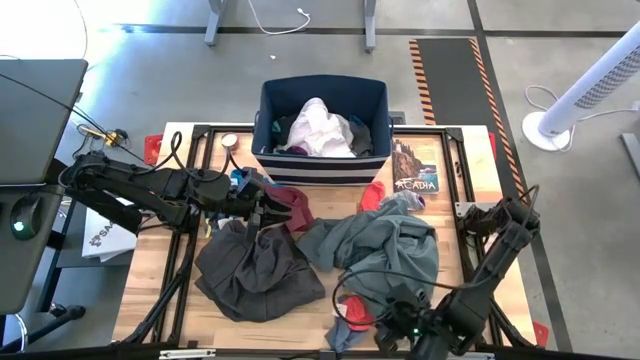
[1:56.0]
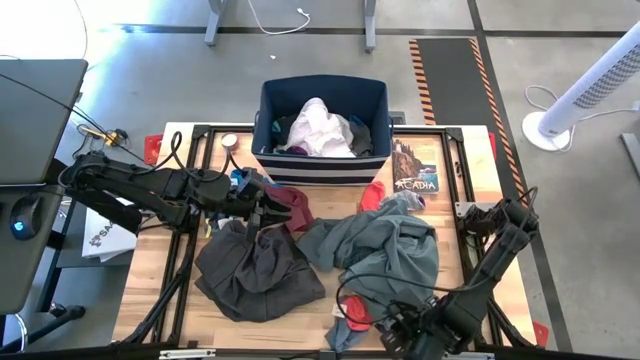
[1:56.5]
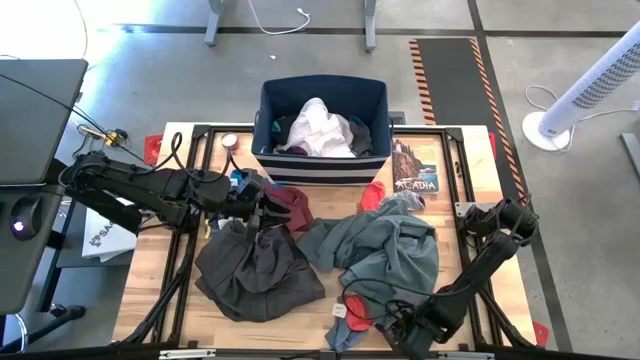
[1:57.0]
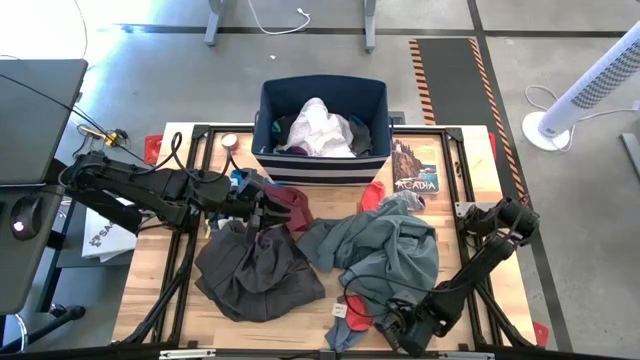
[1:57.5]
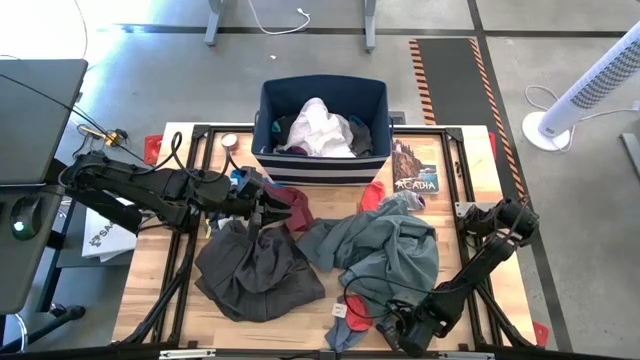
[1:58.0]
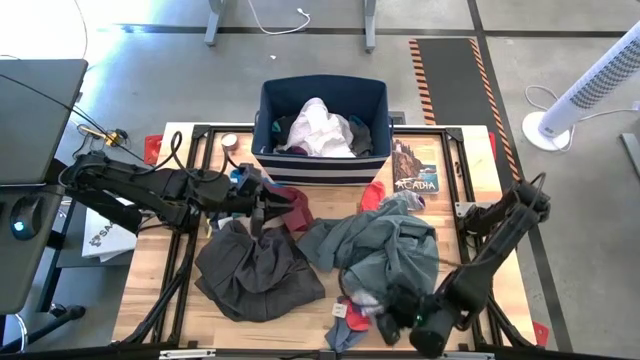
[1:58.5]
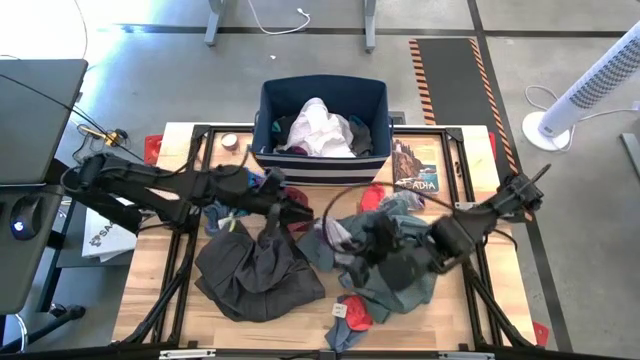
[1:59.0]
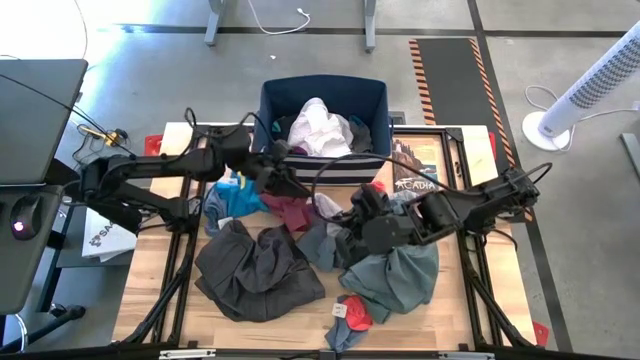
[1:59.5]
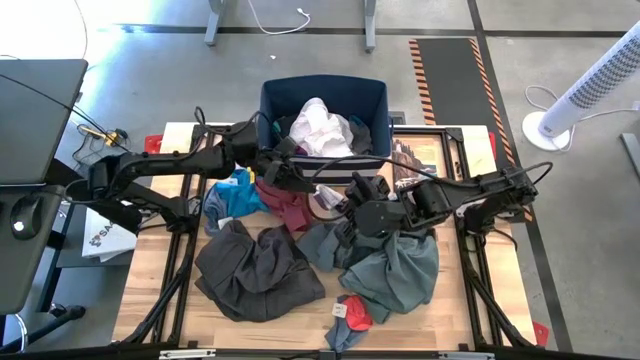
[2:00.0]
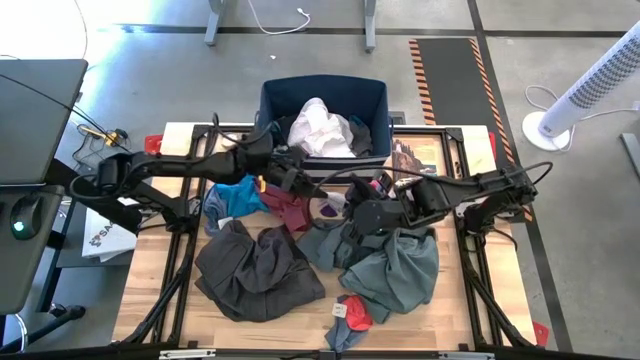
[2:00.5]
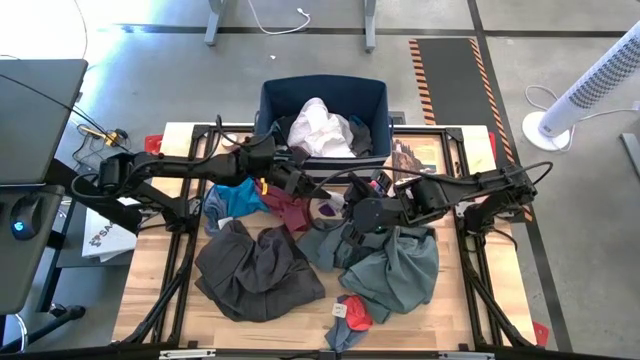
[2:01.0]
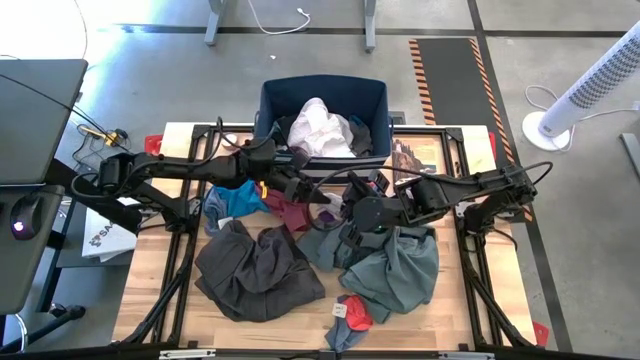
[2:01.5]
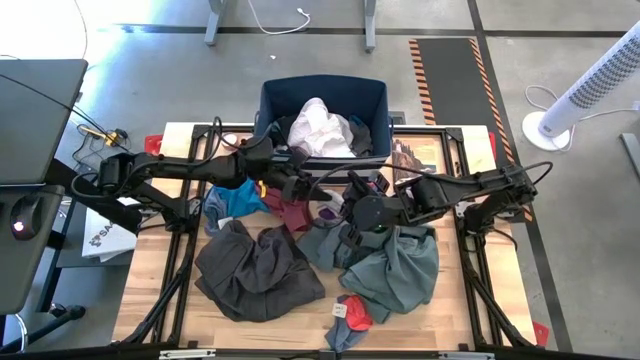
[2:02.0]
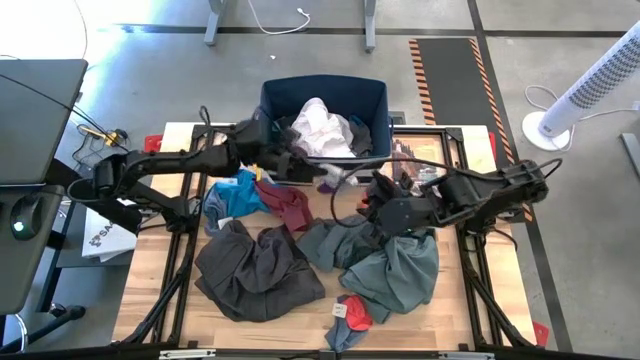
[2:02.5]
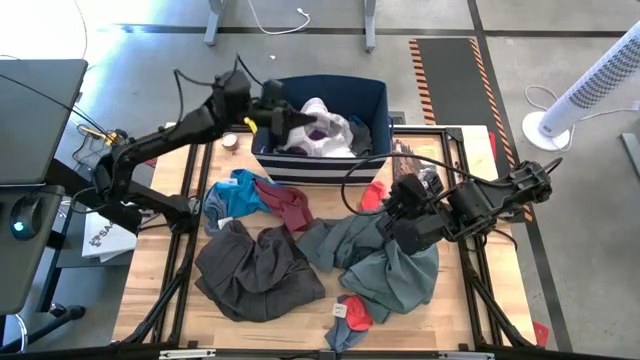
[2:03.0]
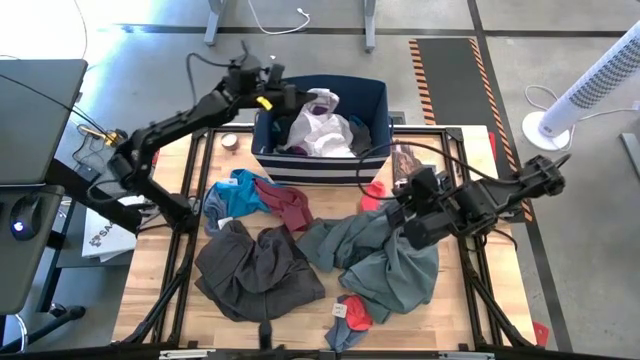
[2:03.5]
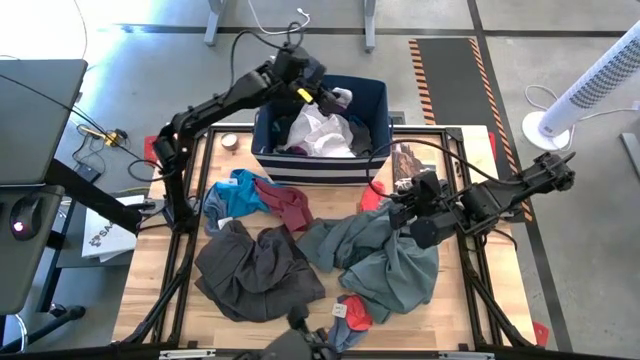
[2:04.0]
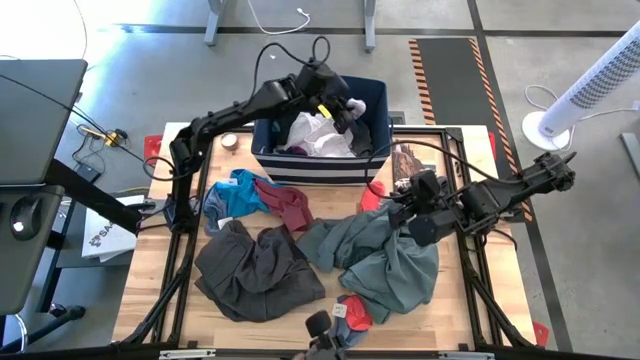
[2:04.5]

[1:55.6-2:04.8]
Task: Sort clothes
Put the grey sock into the blue laundry bin

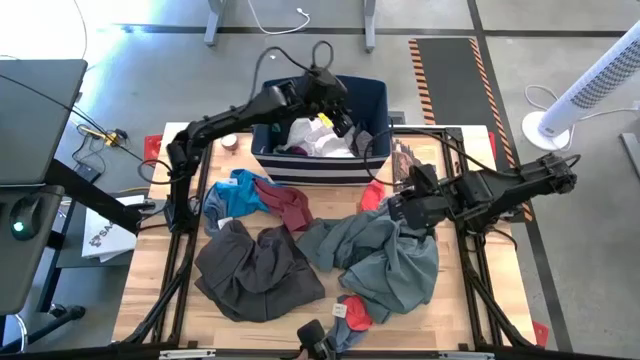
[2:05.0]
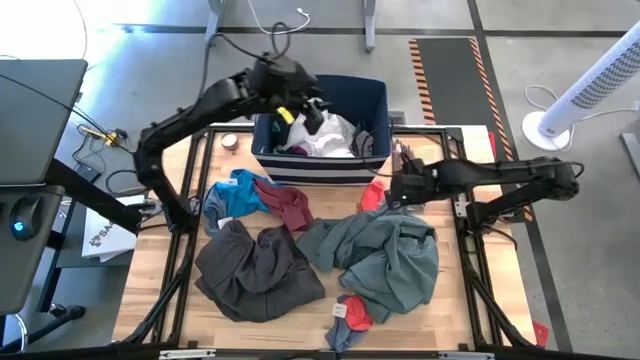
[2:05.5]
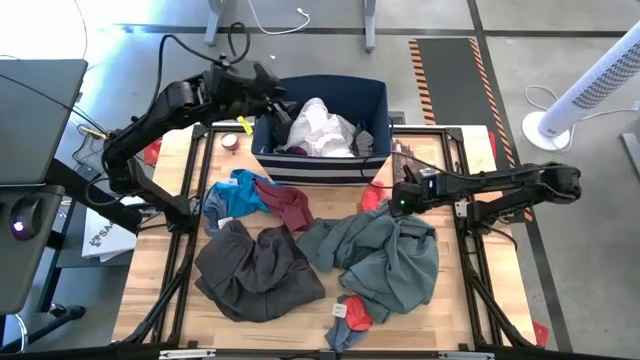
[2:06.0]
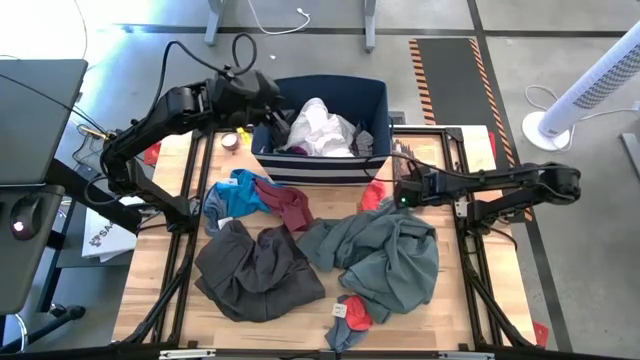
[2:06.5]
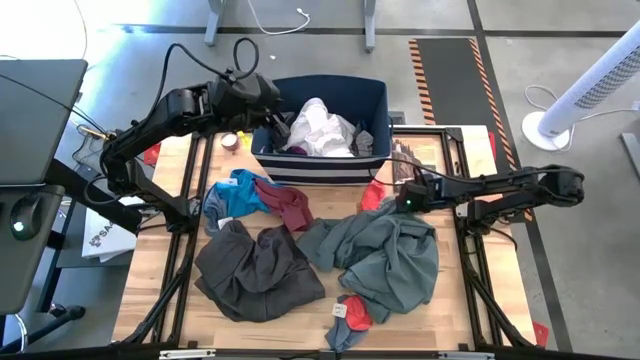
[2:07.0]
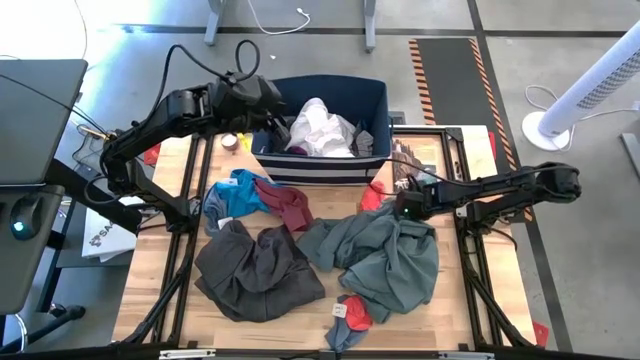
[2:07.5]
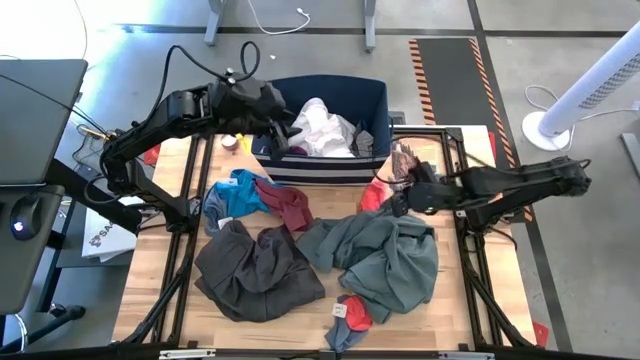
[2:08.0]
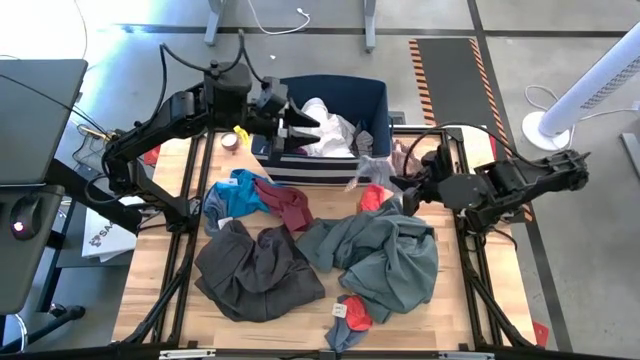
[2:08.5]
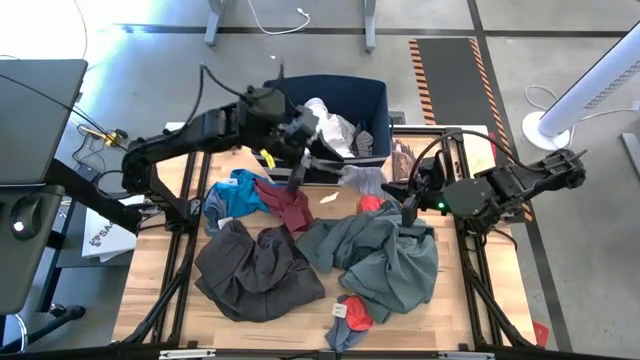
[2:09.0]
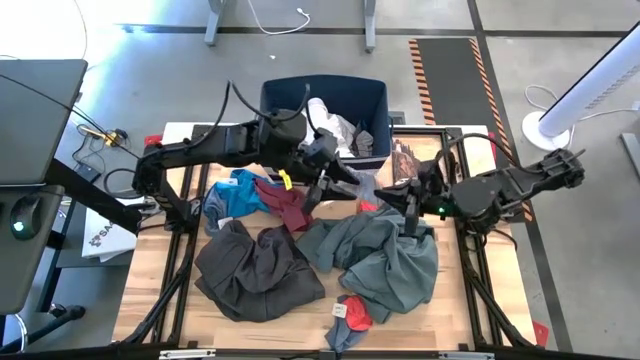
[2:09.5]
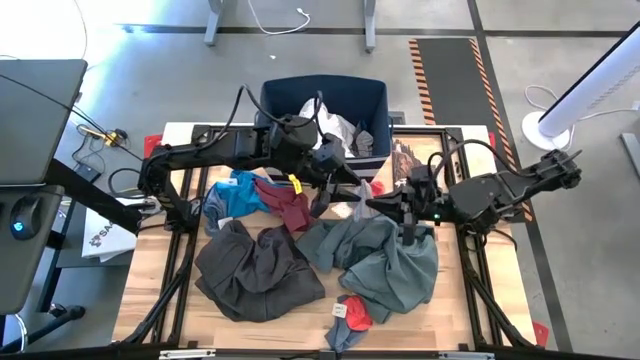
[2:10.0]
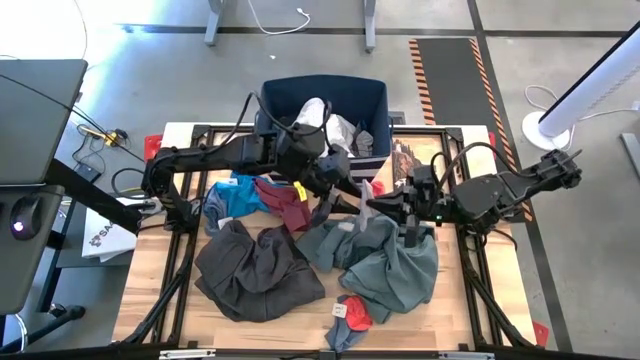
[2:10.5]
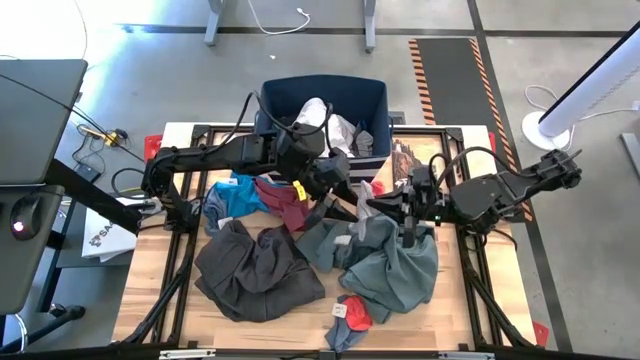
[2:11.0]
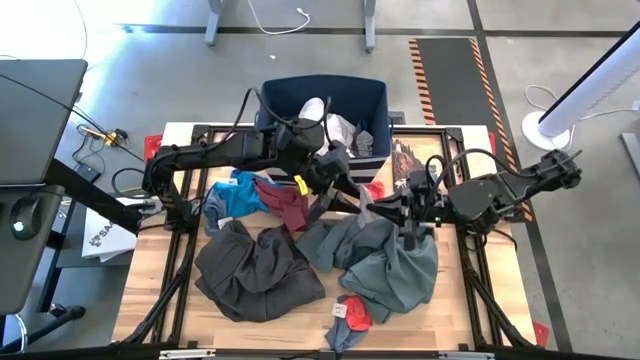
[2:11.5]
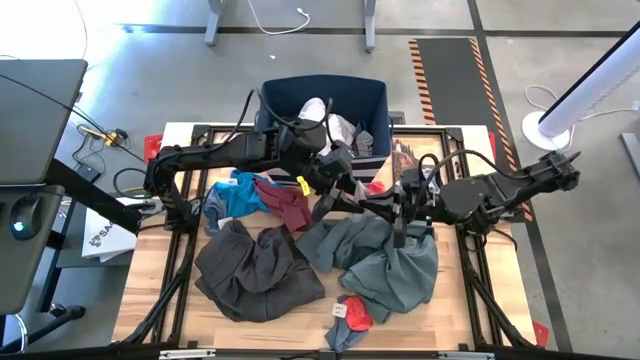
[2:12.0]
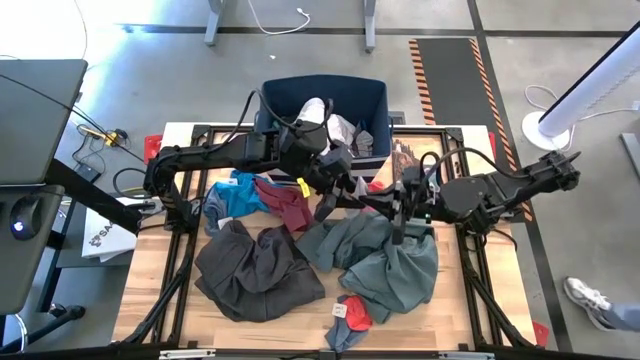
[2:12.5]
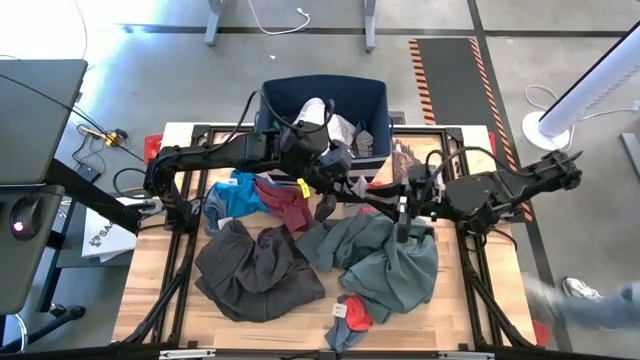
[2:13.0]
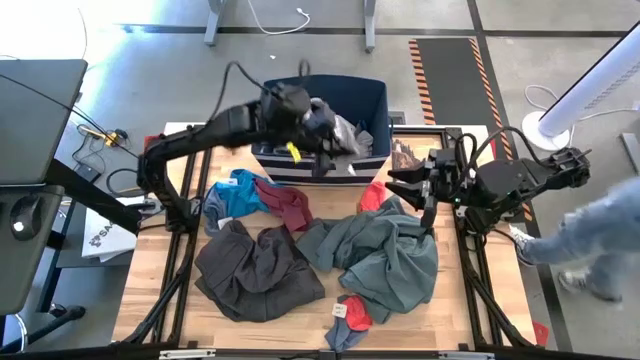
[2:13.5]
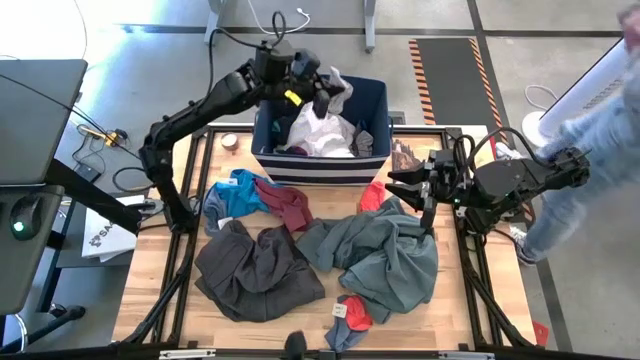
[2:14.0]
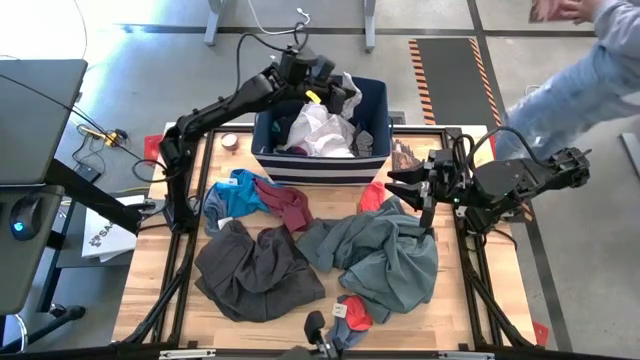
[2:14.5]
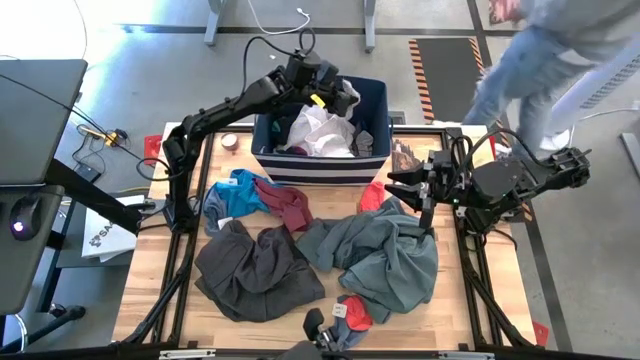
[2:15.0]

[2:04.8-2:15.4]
Put the grey sock into the blue laundry bin

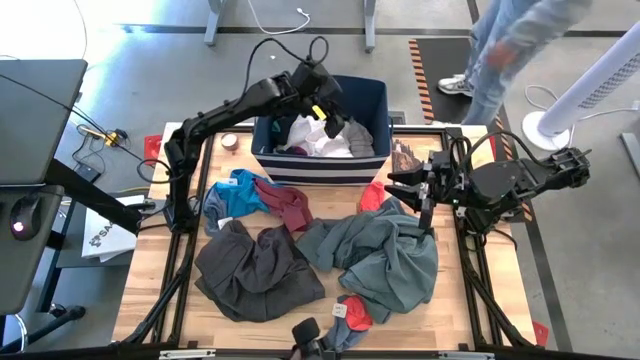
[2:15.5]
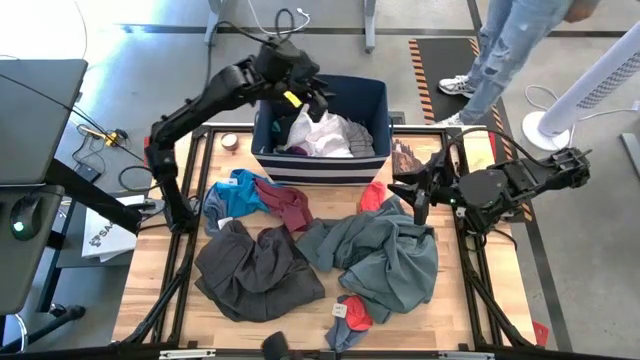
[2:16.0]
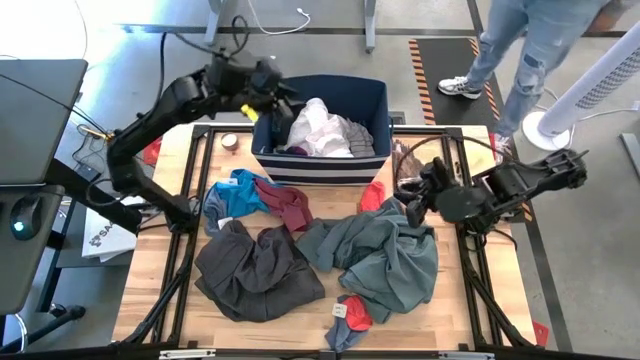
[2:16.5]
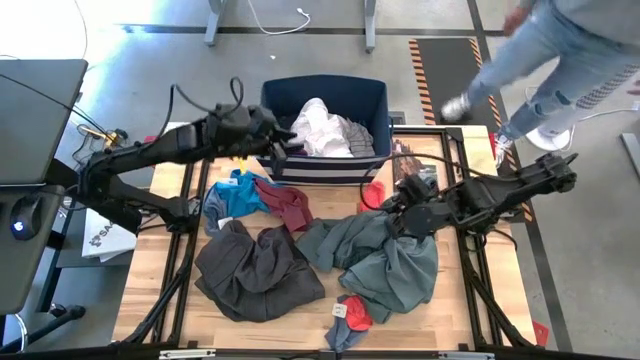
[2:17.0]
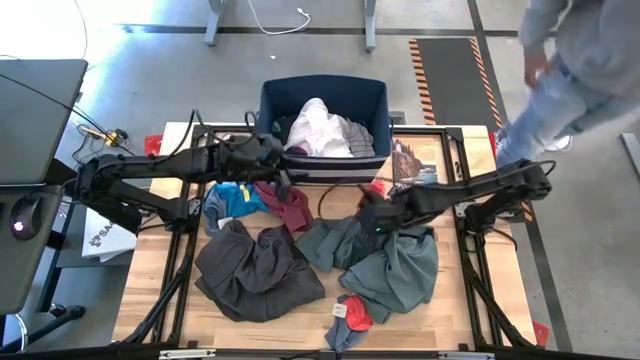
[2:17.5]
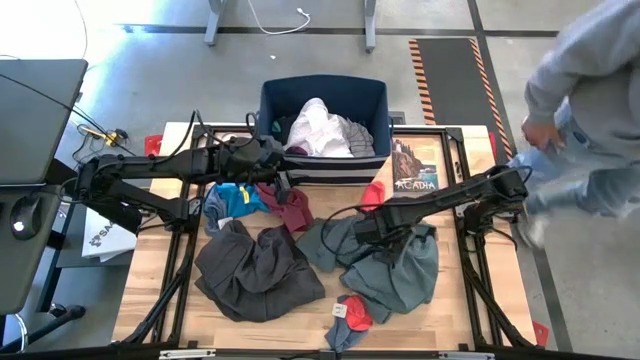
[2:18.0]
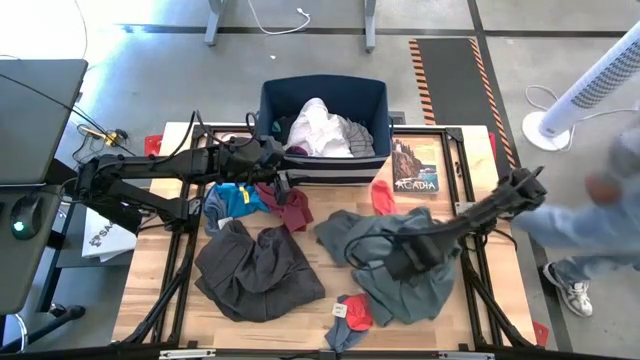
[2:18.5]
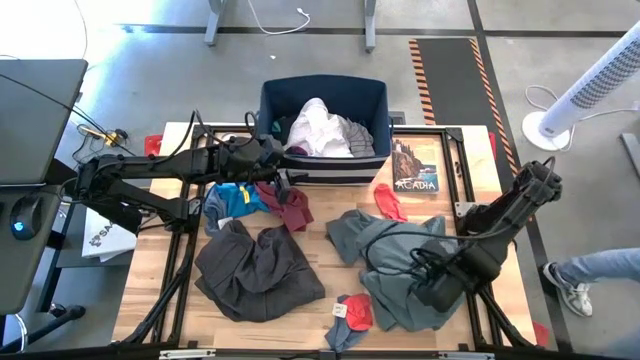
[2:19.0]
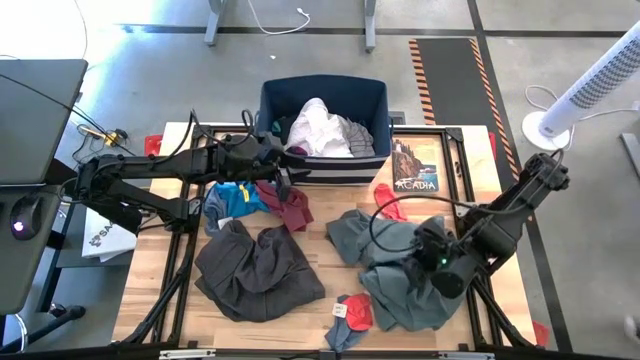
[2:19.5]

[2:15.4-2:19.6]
Put the orange sock into the blue laundry bin
